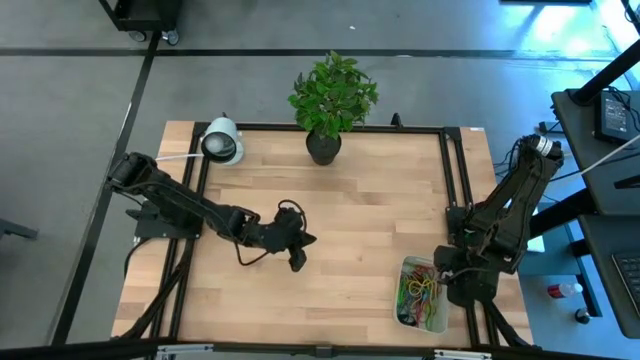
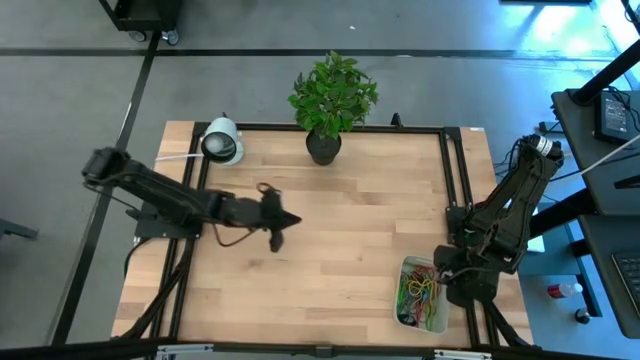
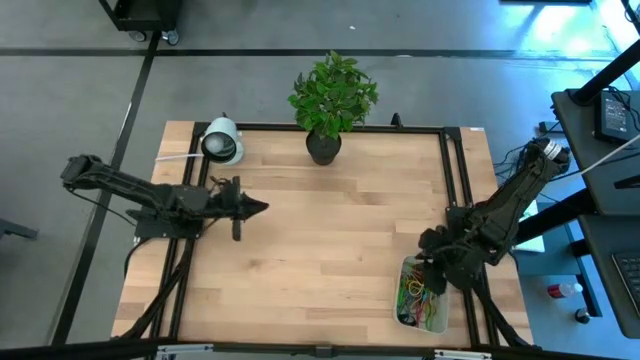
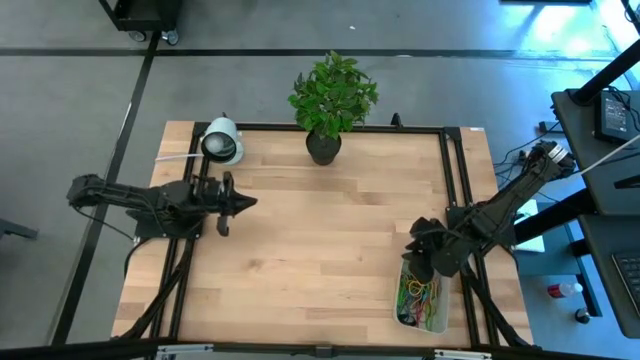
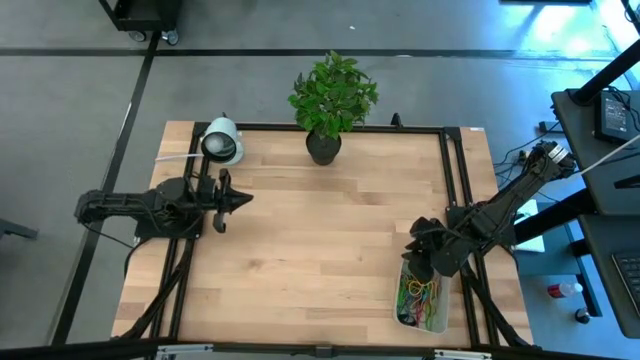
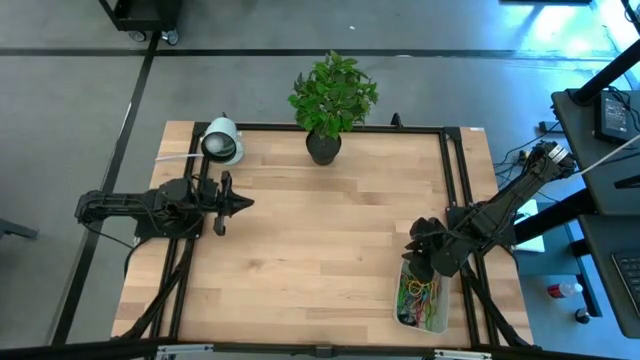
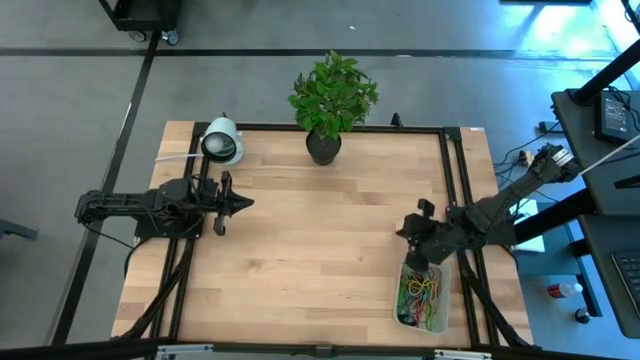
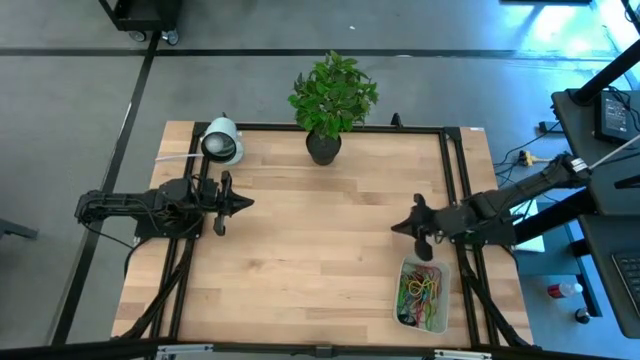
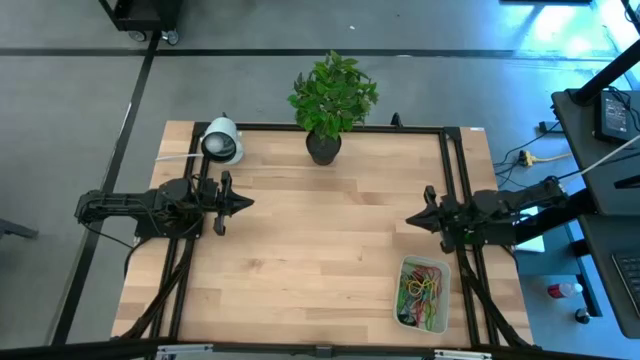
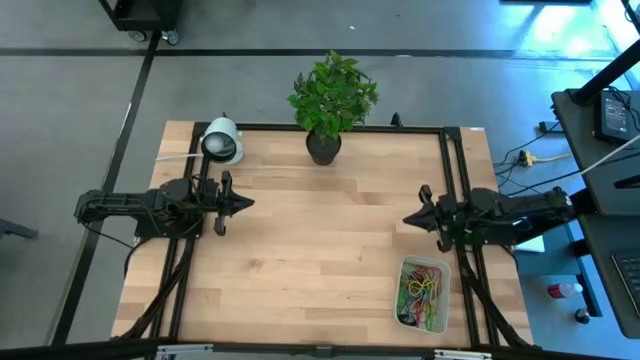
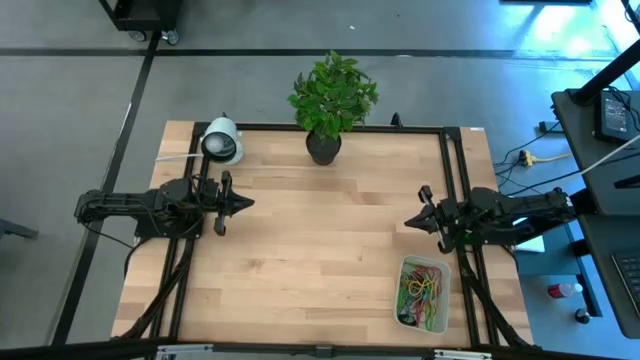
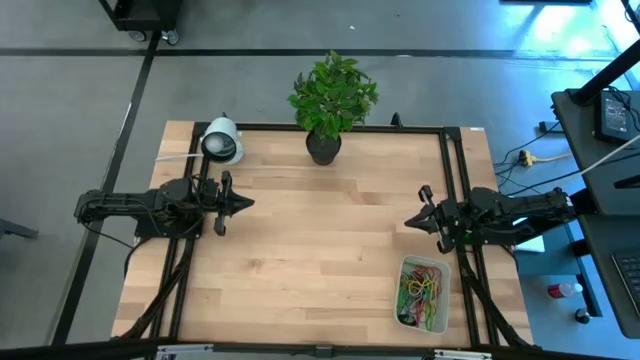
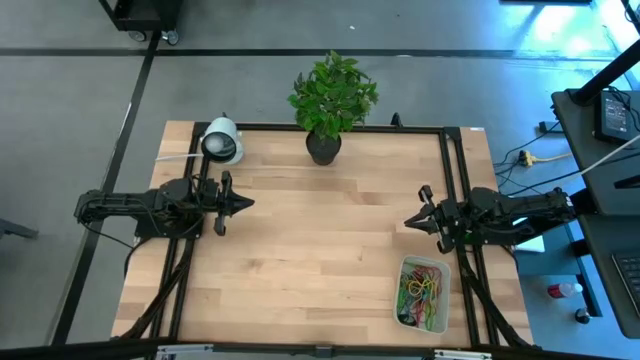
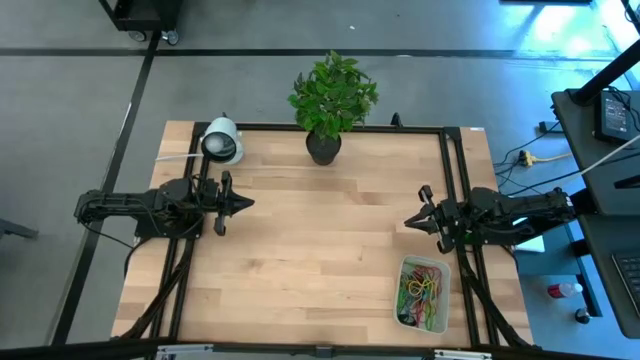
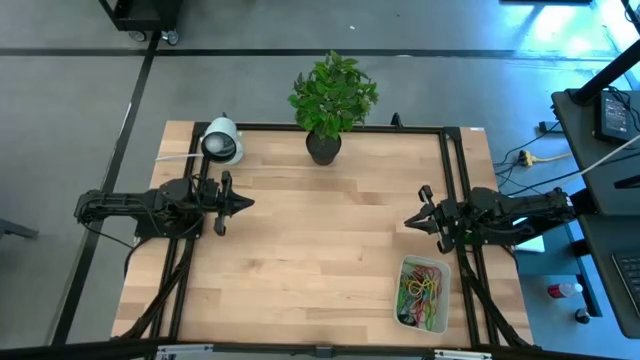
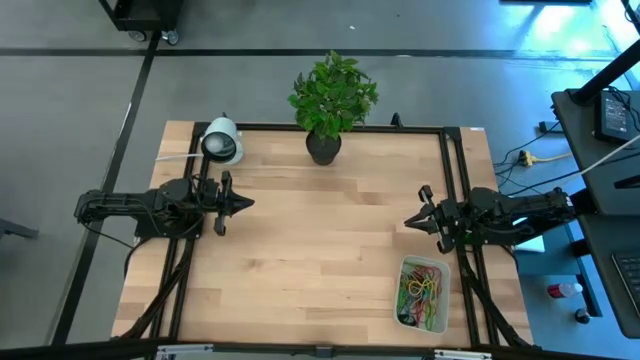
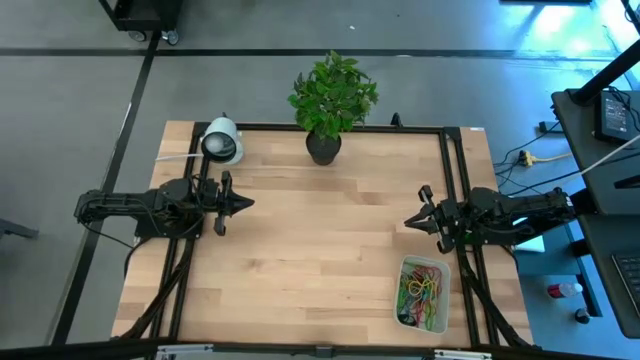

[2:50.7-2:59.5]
Task: Pick and place rubber bands into bin
Return to Home Position

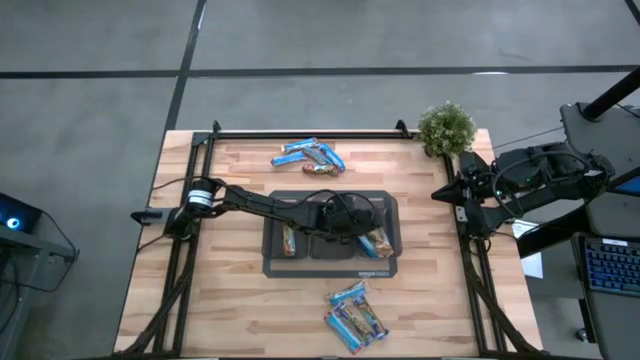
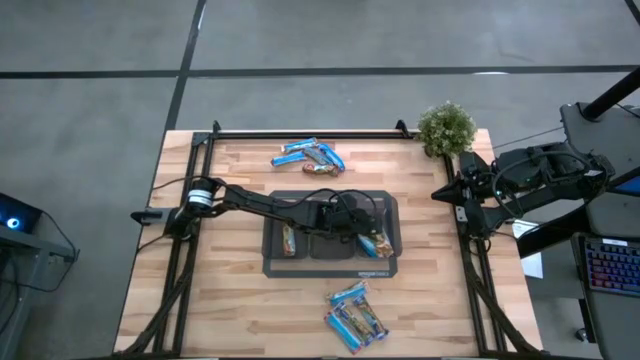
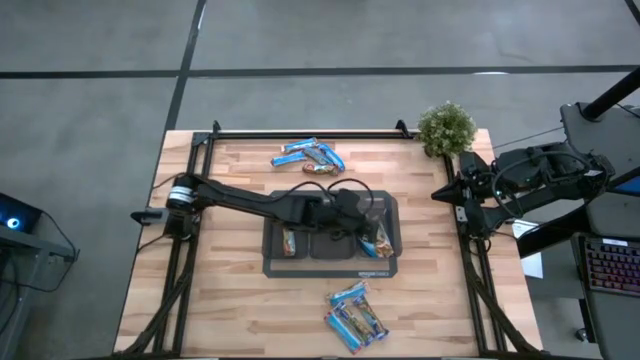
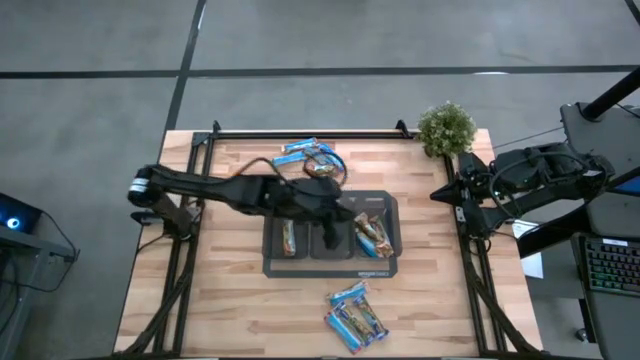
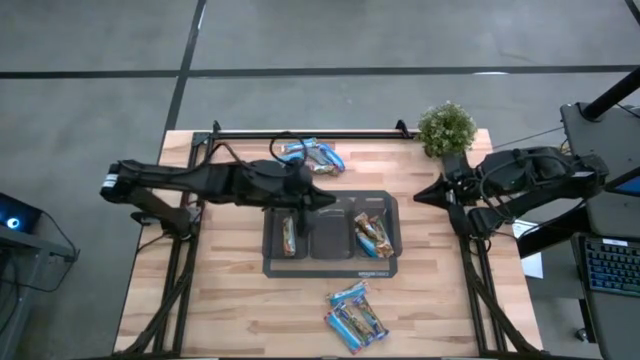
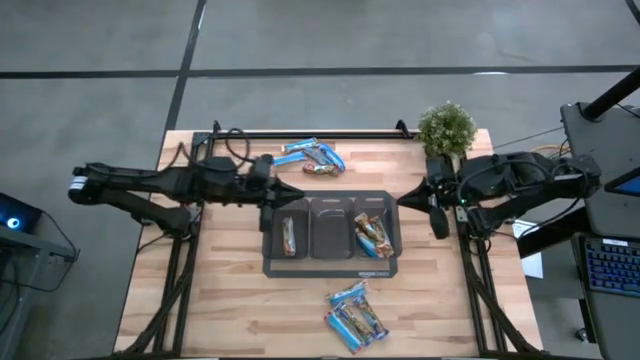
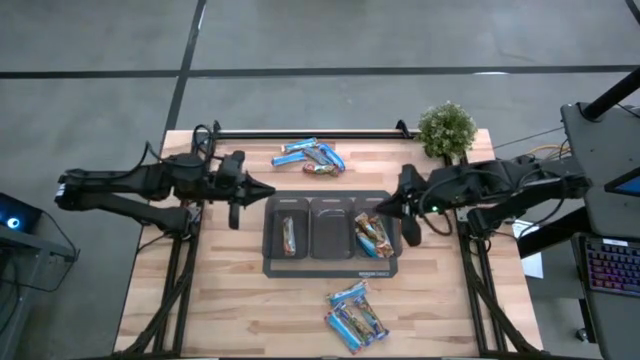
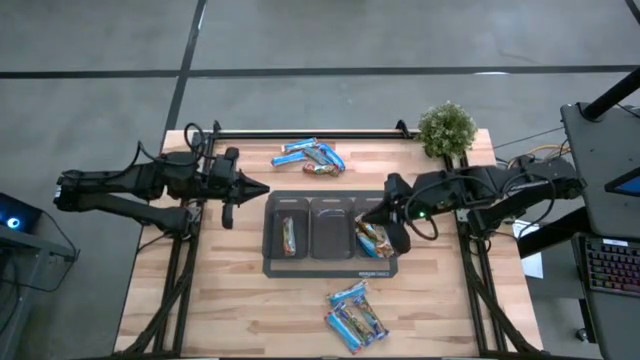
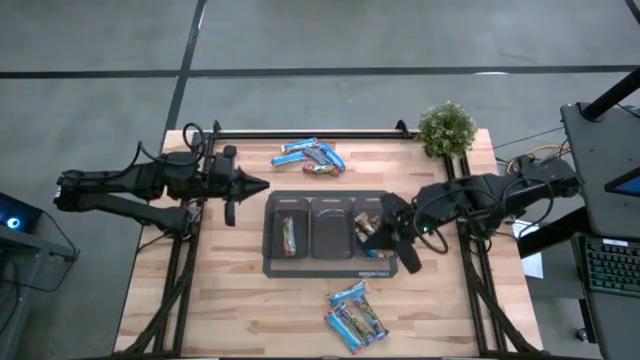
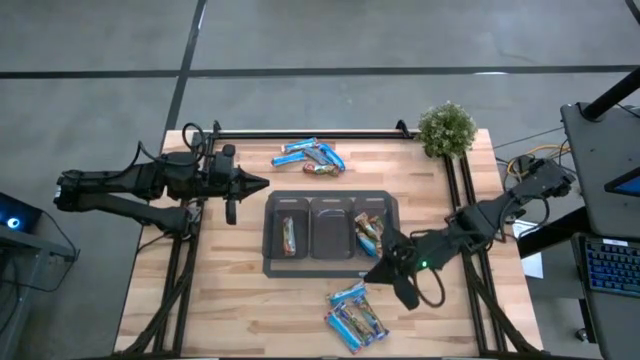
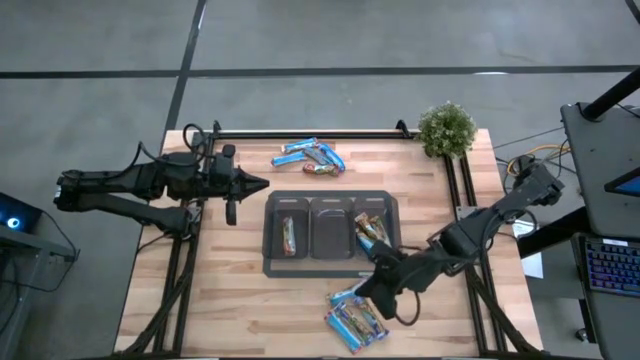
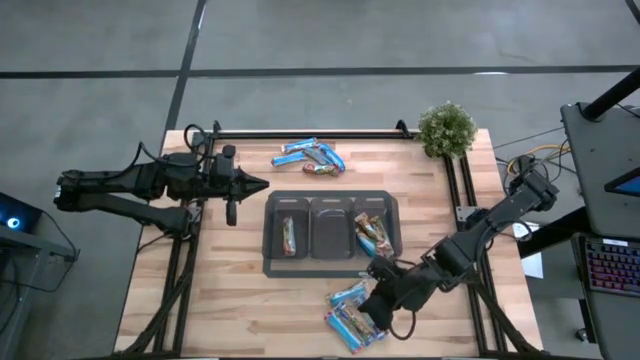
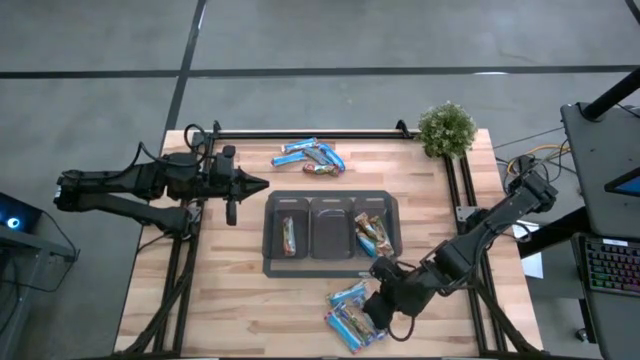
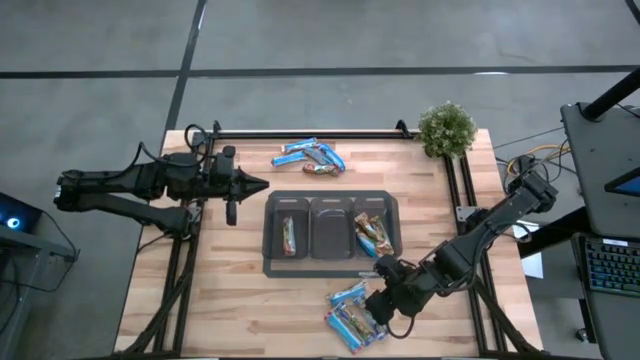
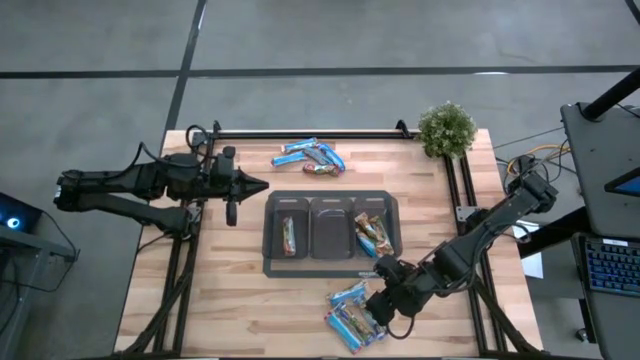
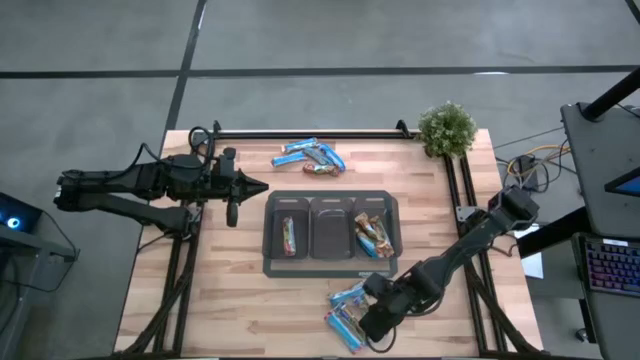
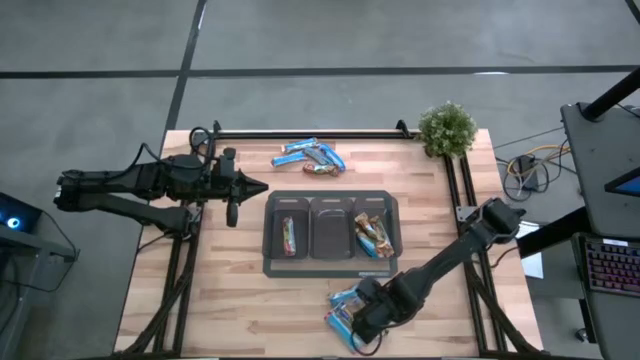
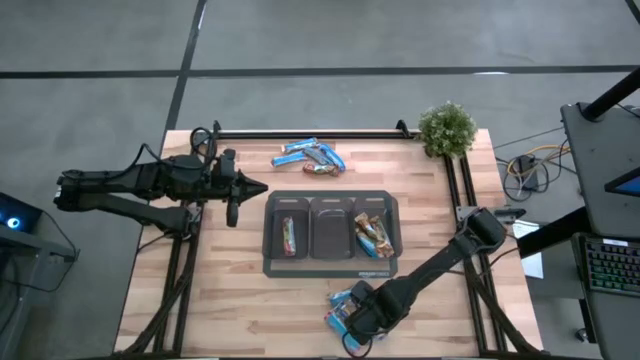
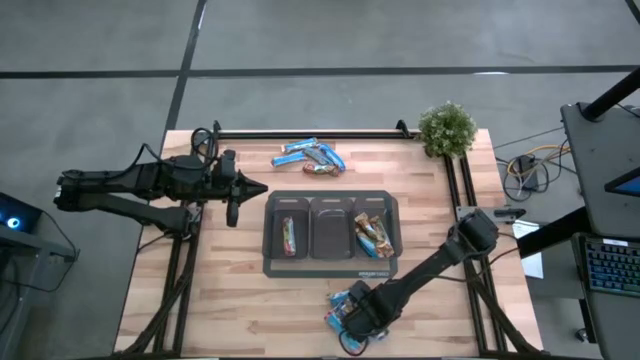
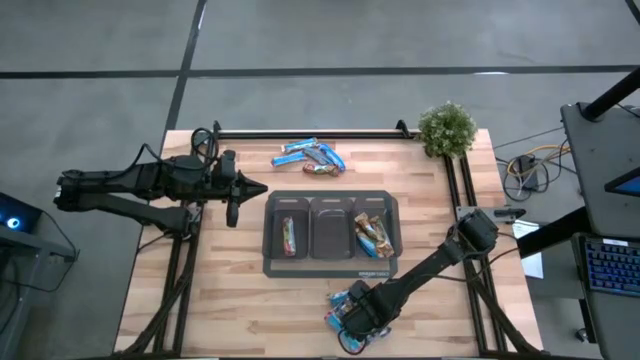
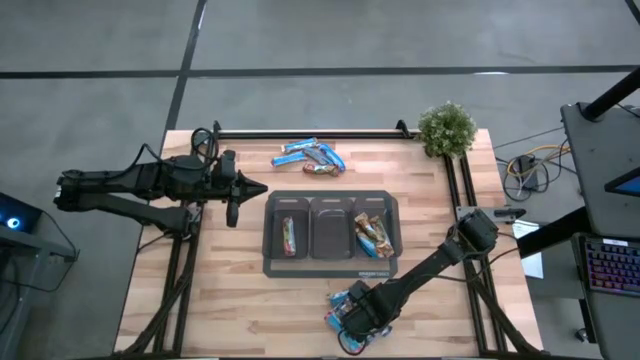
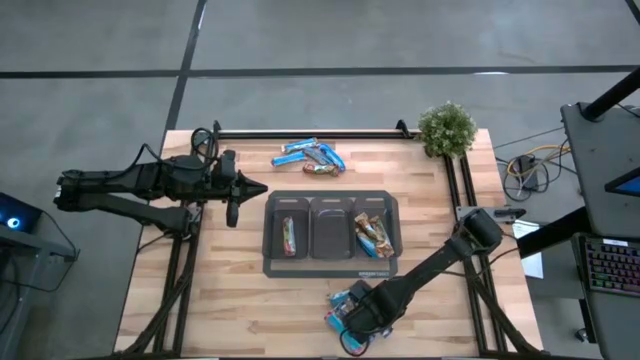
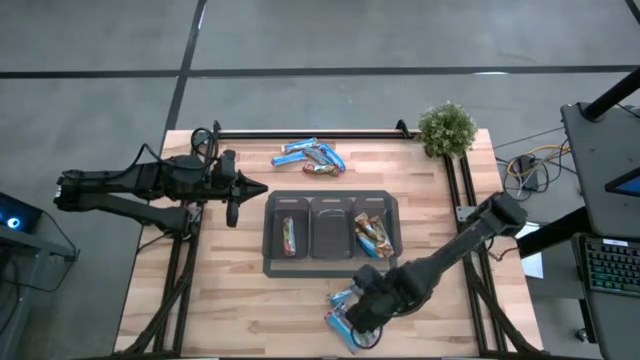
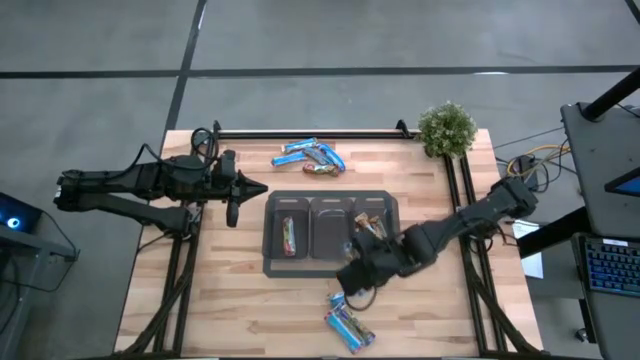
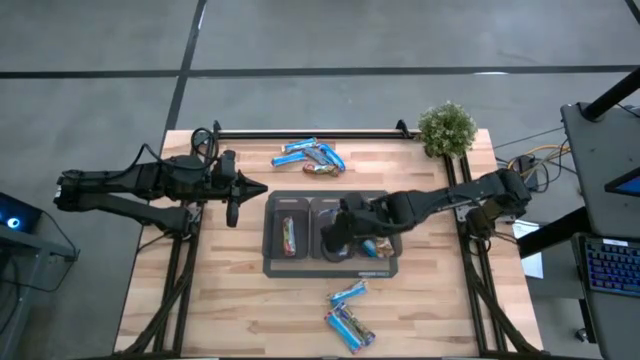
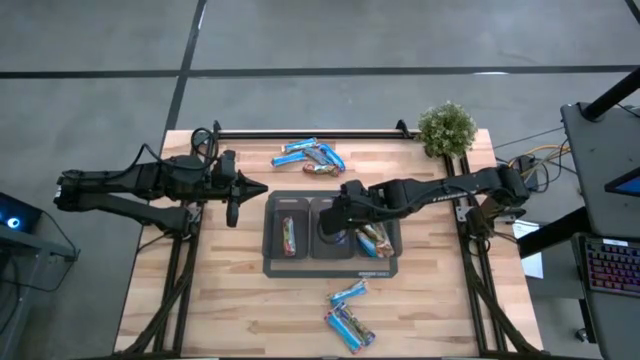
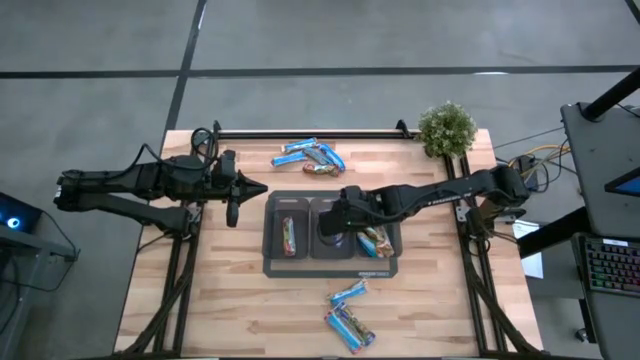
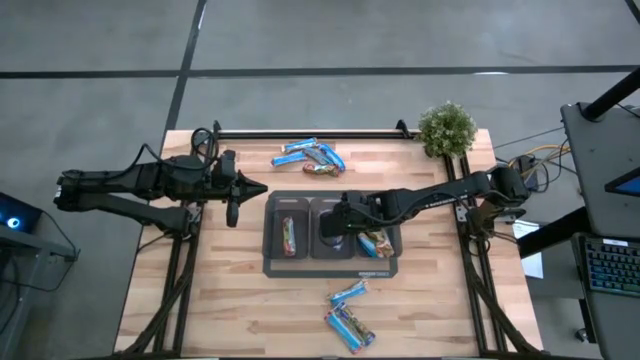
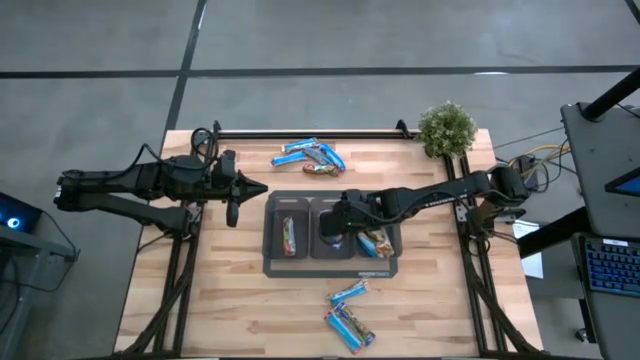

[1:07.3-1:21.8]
Task: Pick and place Granola Bars by type
Put the blue granola bar into the middle black bin
